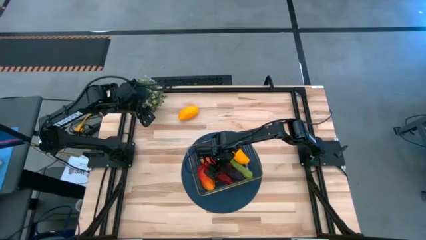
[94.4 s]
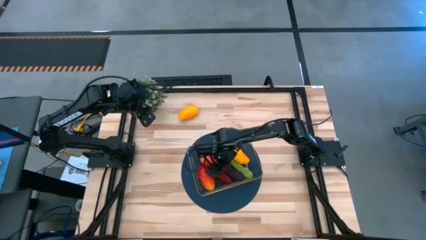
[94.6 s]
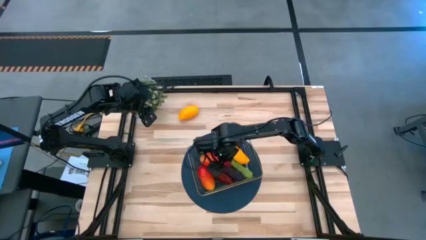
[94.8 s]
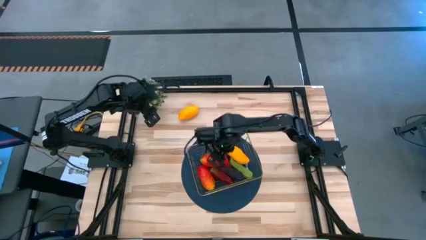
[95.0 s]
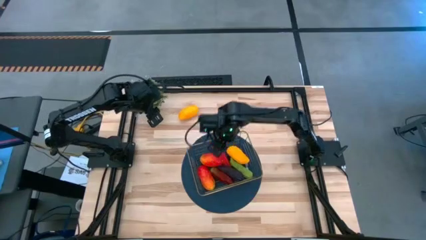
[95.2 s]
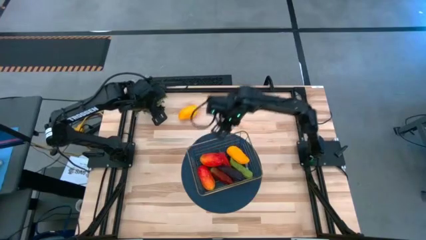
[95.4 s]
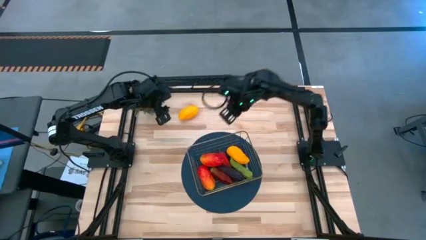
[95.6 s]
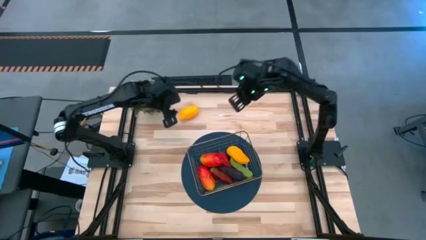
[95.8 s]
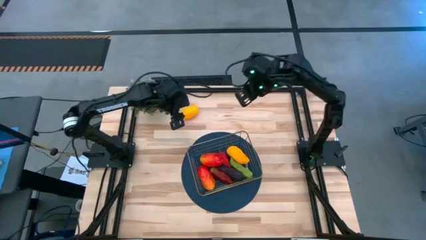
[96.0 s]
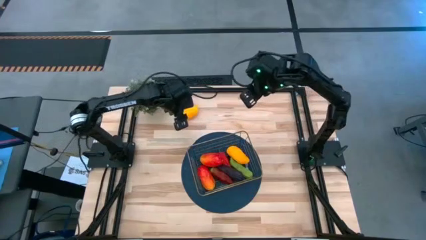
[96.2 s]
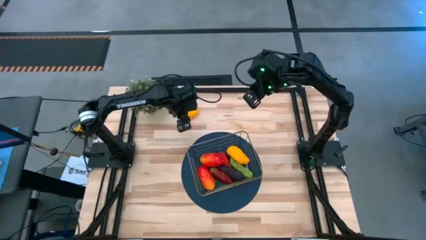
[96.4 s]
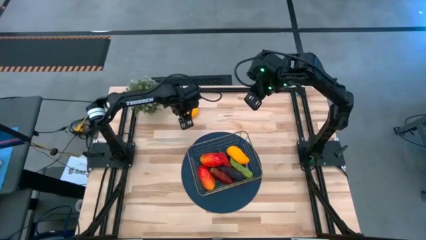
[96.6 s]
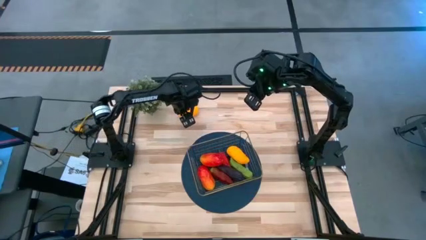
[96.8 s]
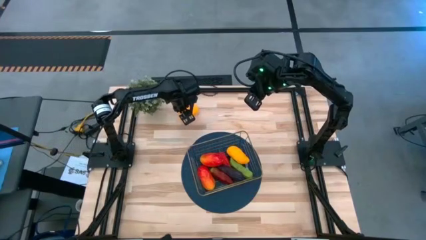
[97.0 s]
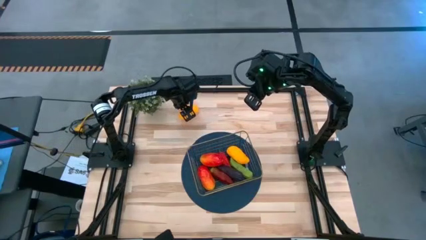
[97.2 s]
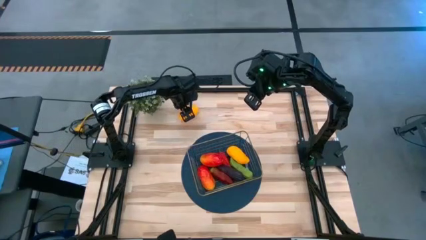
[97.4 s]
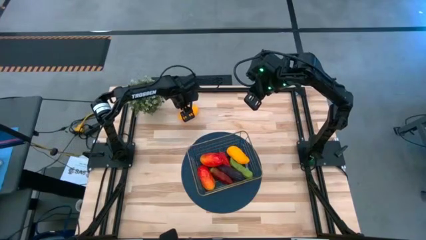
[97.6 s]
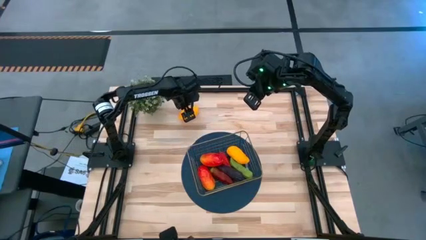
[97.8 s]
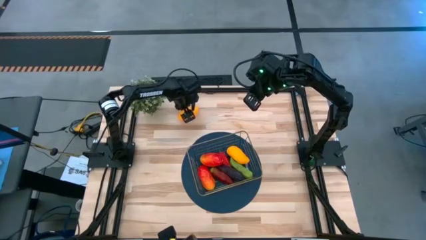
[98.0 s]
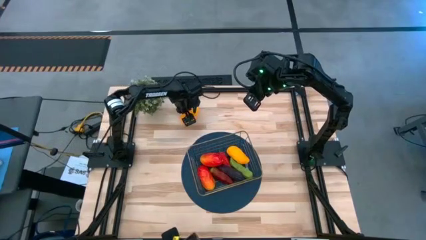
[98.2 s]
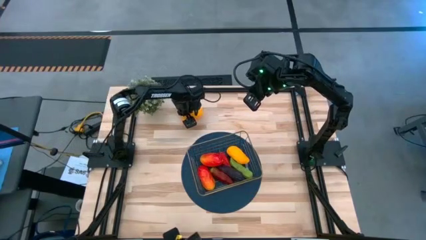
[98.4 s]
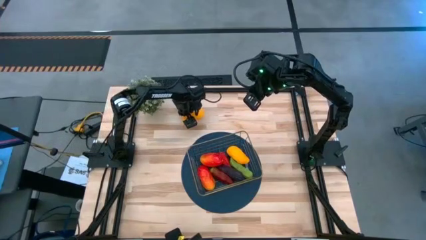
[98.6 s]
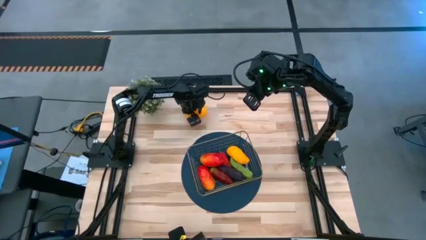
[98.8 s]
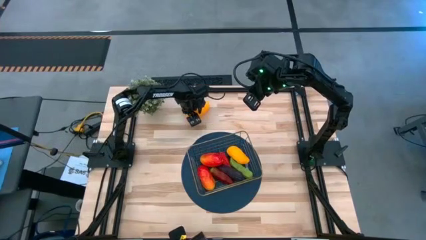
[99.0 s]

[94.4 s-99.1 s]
Task: Build produce basket
Put the yellow mango into the gold wire basket

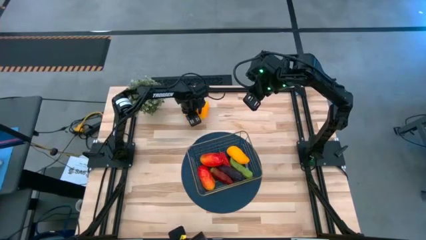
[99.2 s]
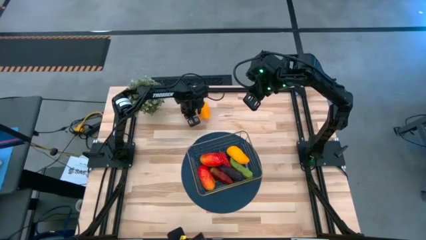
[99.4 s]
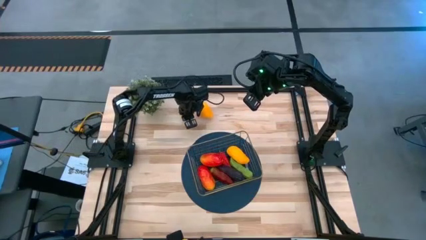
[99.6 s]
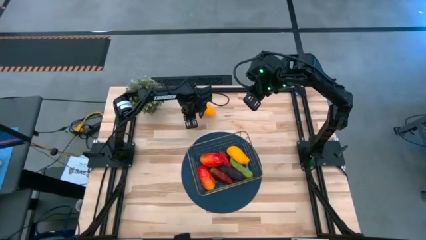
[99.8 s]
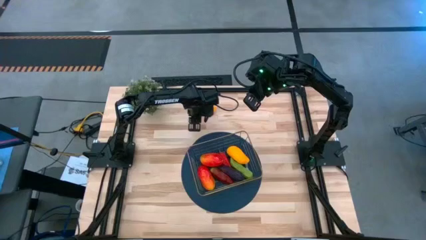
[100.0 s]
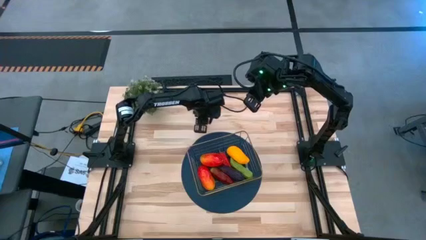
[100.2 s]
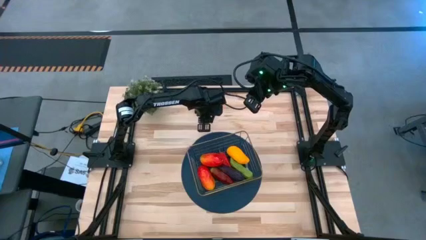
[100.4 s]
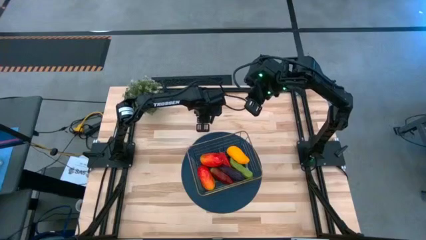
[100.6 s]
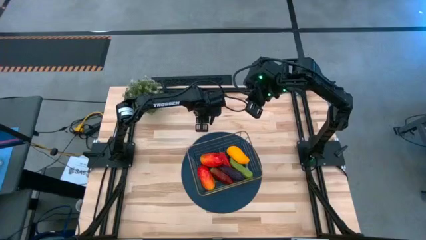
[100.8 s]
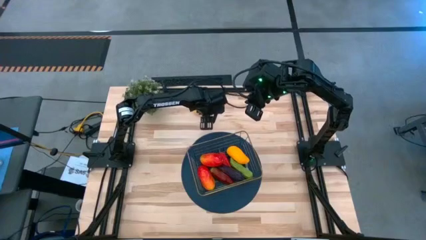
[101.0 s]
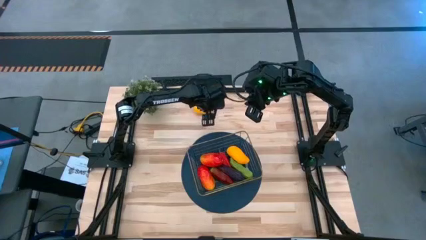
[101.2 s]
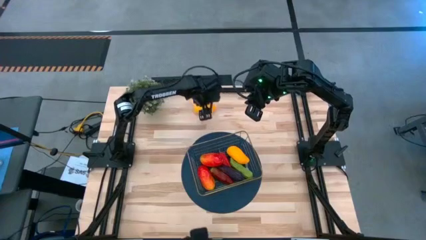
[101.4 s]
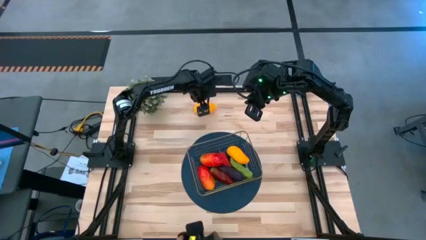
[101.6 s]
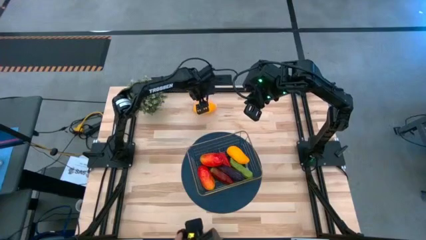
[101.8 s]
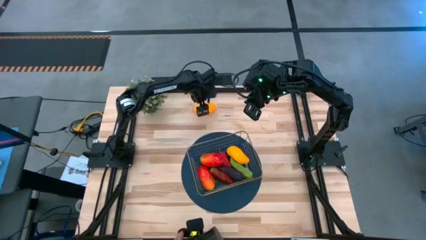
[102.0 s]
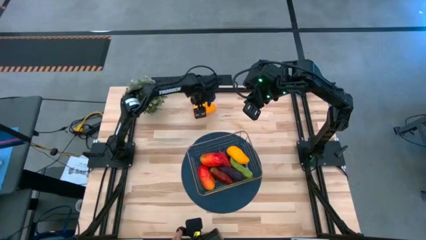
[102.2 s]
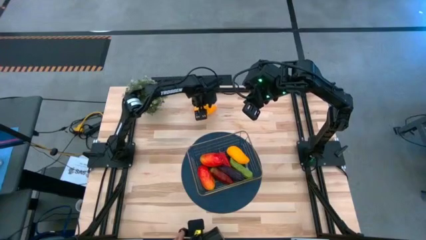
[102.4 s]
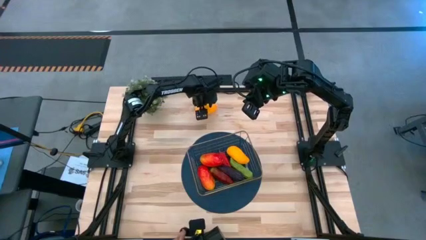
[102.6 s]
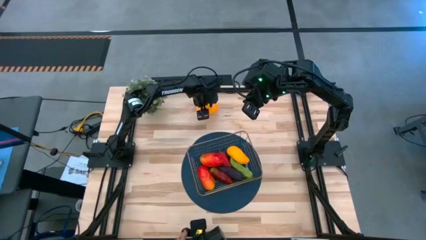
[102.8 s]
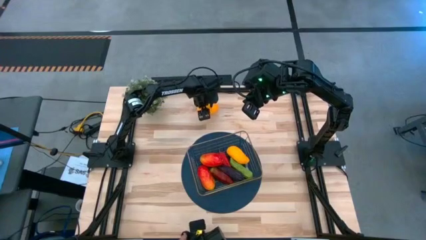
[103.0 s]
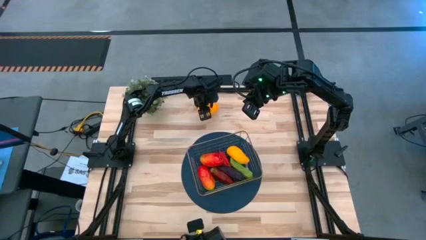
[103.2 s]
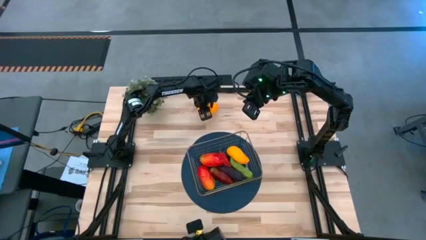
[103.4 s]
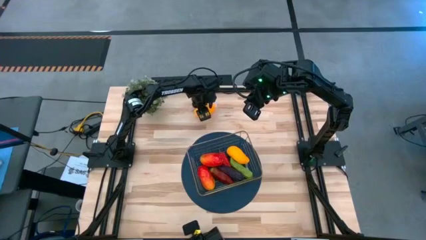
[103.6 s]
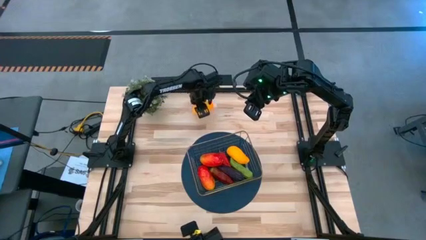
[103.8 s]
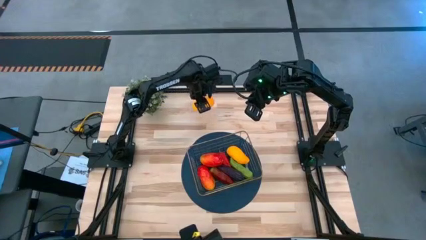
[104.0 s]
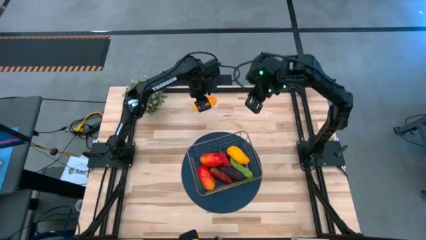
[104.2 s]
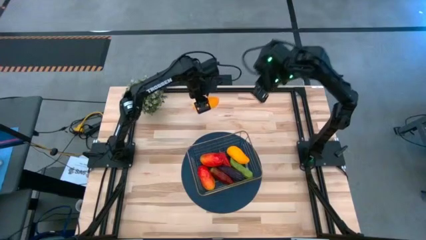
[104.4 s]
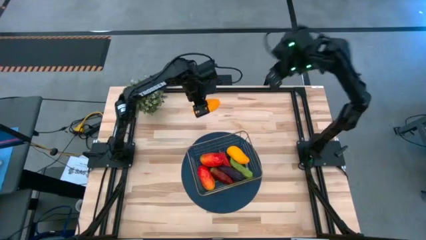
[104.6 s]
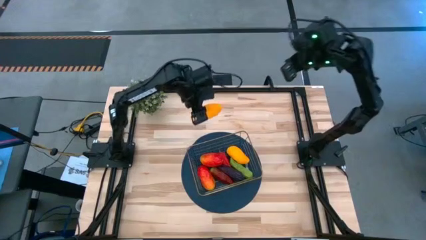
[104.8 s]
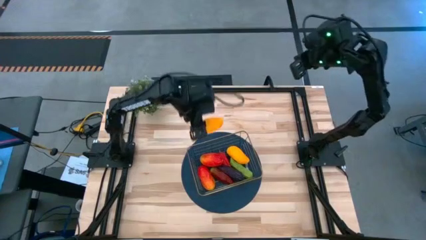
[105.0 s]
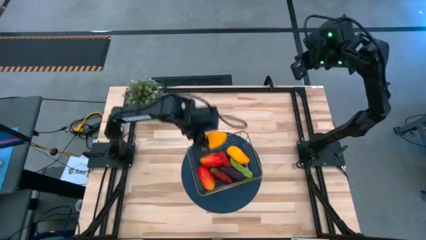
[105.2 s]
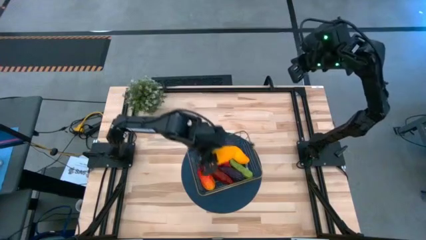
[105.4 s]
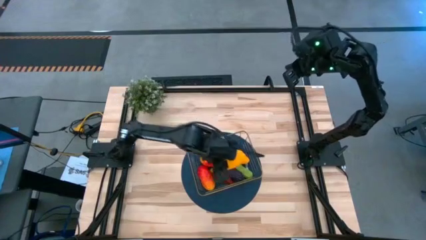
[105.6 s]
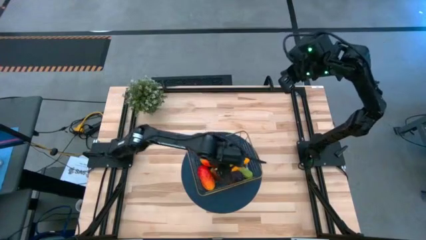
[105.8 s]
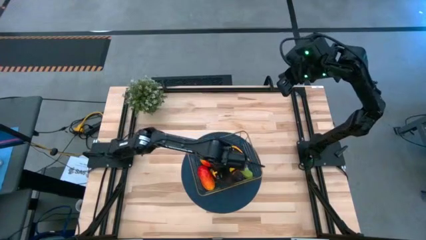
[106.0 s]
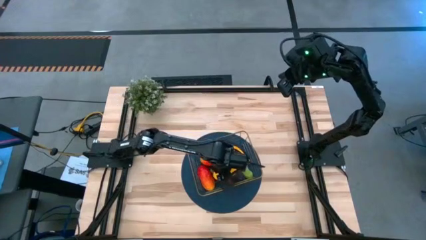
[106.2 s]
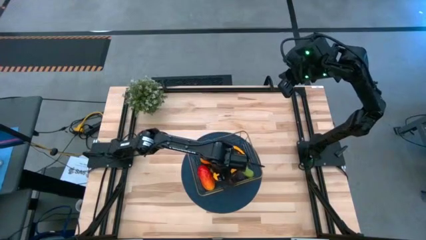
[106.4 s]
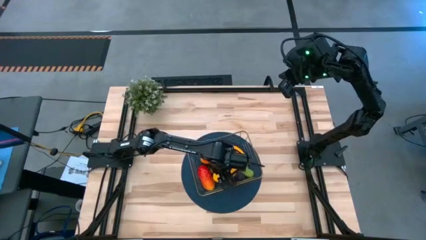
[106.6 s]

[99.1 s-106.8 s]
Put the yellow mango into the gold wire basket

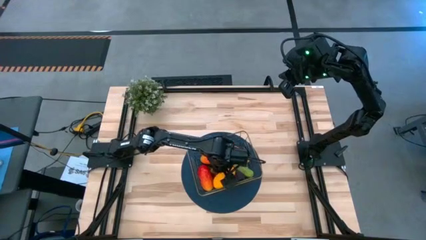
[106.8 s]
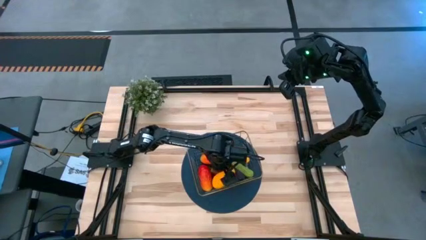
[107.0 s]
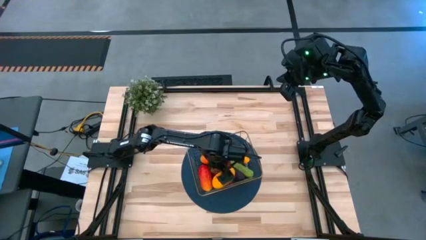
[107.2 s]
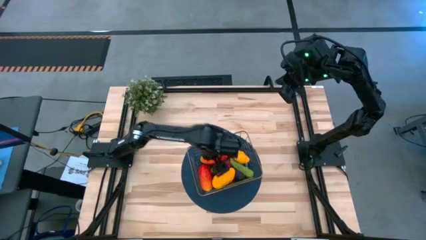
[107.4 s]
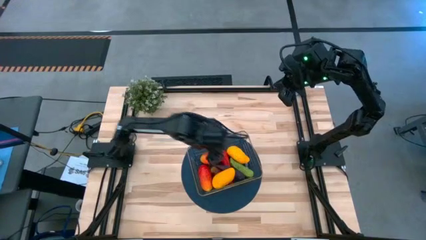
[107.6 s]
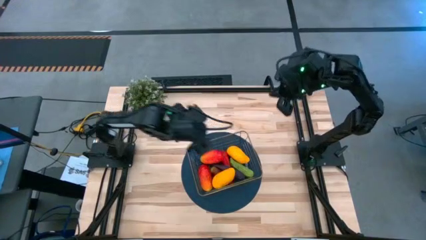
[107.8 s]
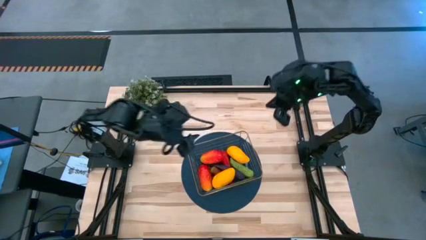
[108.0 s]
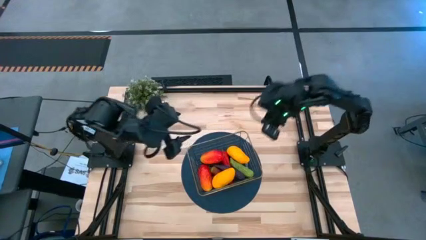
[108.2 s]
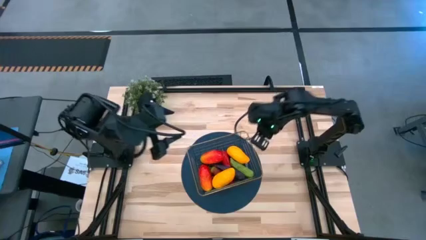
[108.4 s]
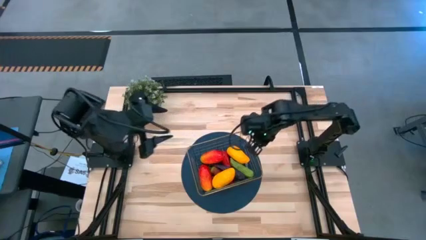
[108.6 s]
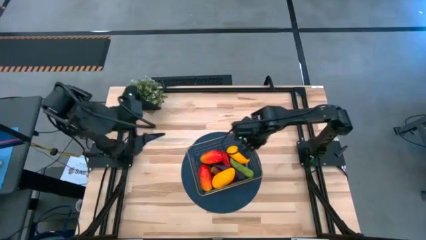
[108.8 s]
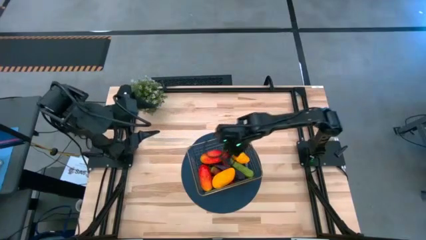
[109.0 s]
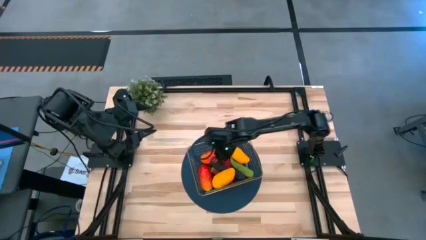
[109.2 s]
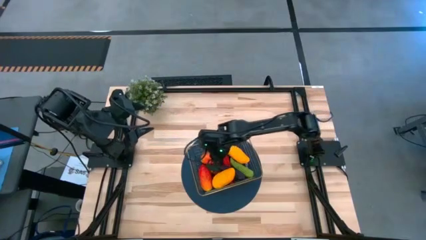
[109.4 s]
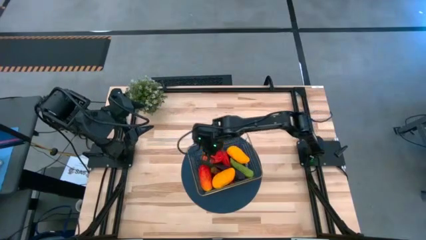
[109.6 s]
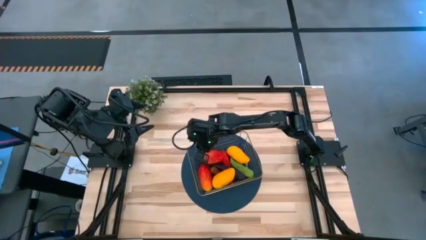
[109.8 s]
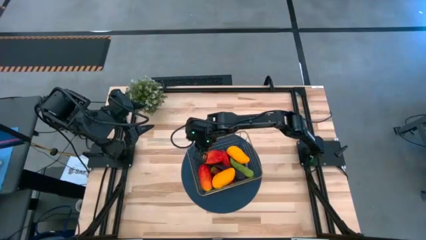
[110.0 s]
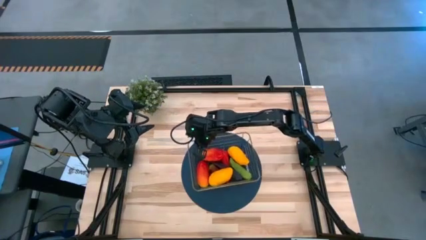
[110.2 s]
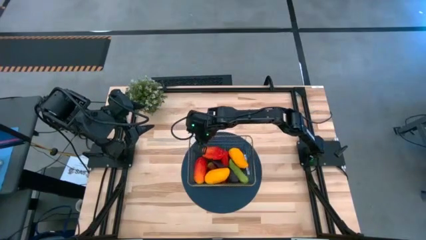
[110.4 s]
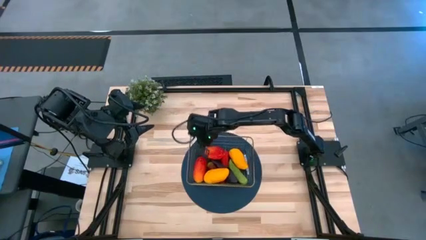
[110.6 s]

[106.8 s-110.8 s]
Adjust the gold wire basket
